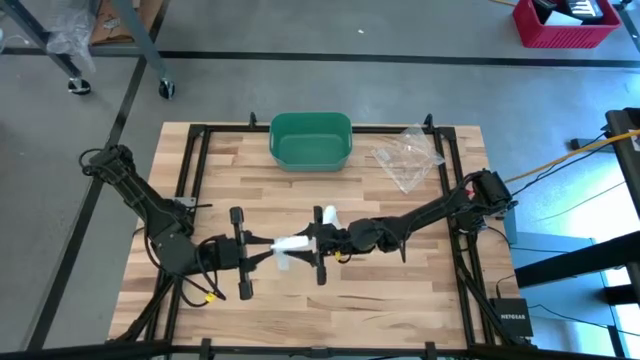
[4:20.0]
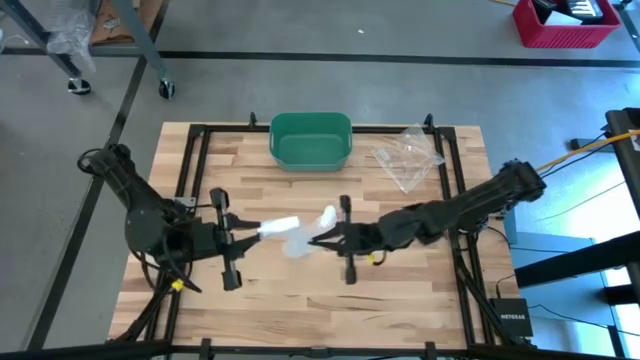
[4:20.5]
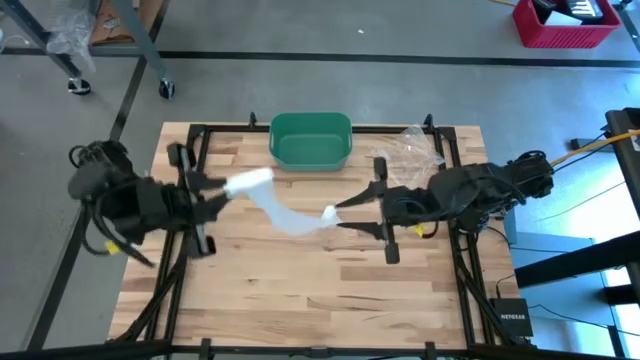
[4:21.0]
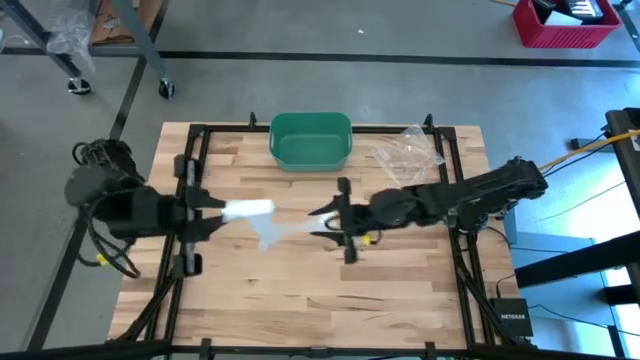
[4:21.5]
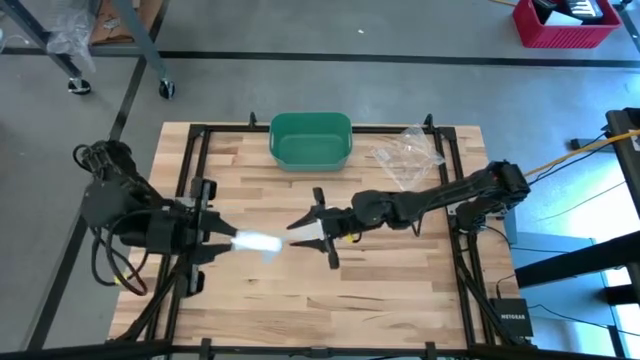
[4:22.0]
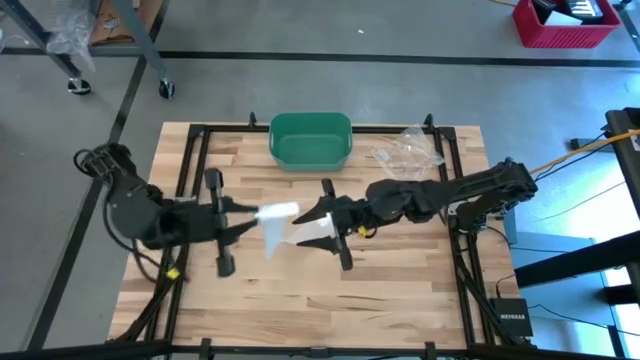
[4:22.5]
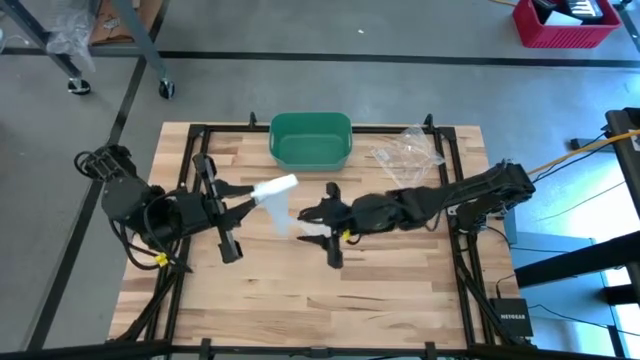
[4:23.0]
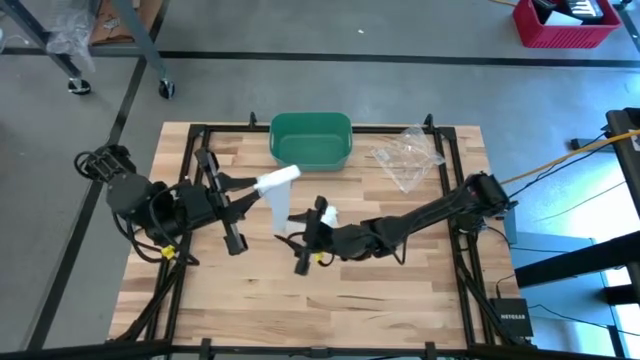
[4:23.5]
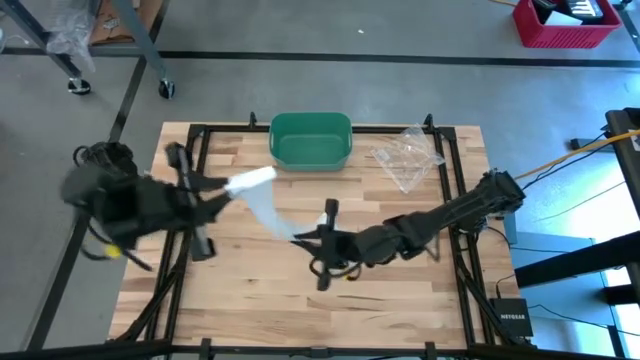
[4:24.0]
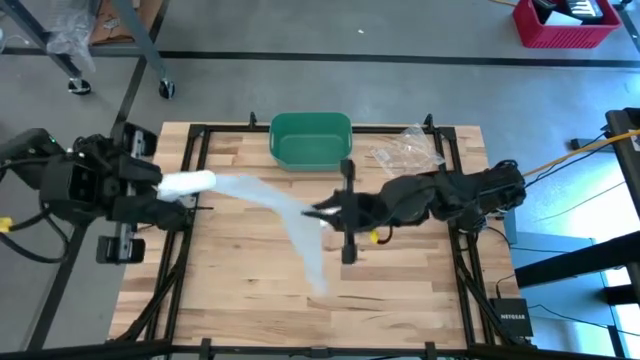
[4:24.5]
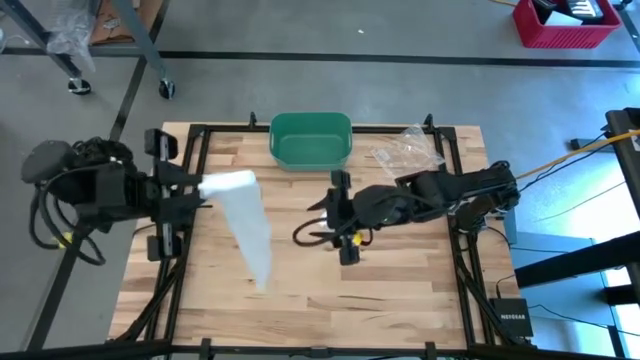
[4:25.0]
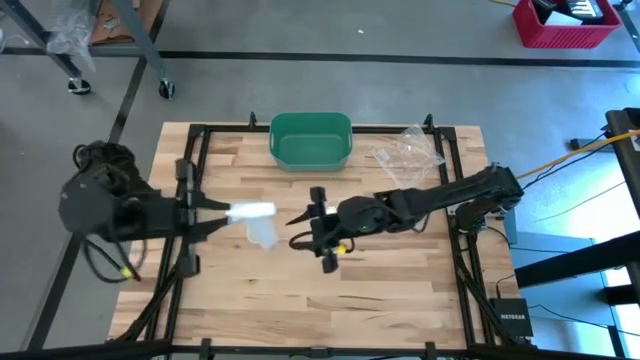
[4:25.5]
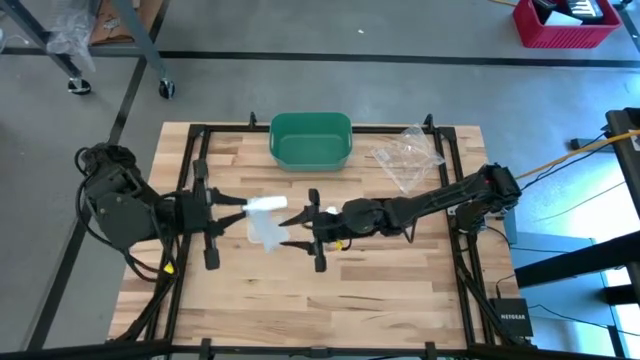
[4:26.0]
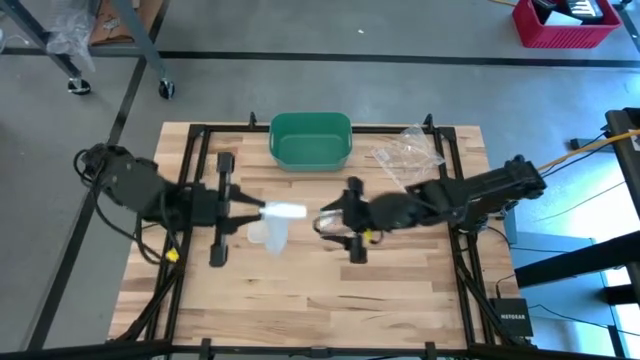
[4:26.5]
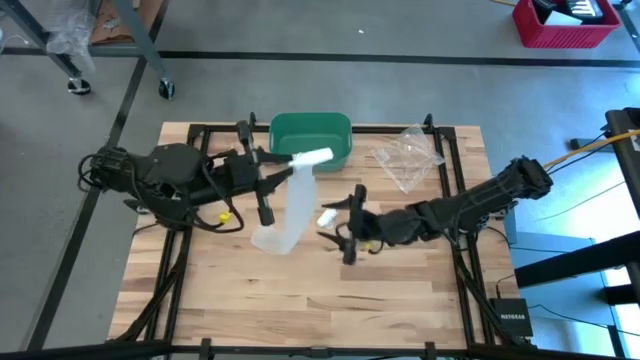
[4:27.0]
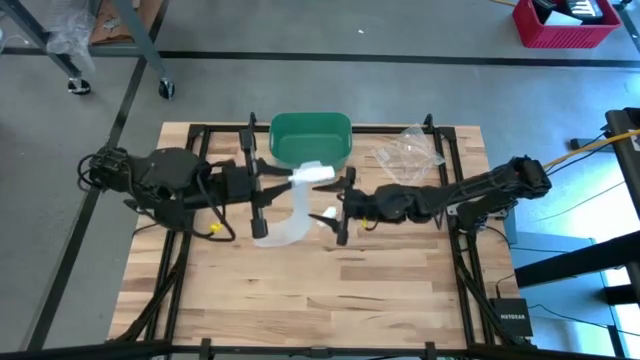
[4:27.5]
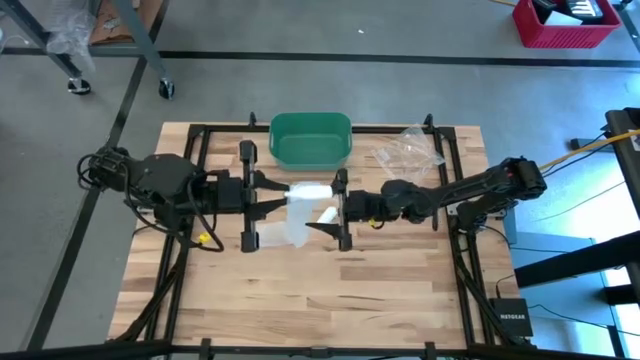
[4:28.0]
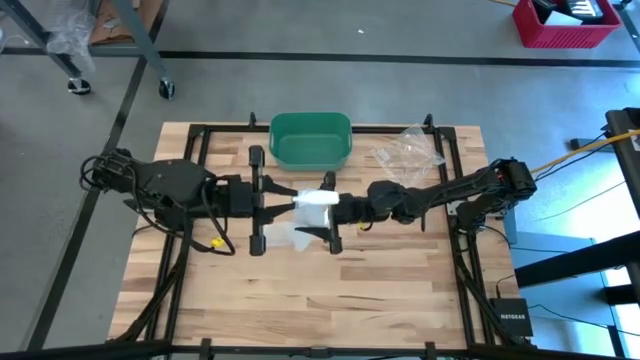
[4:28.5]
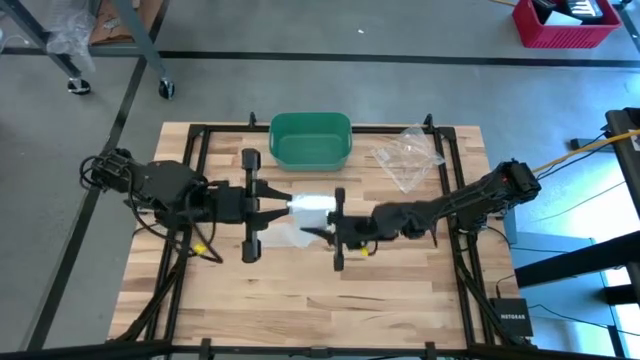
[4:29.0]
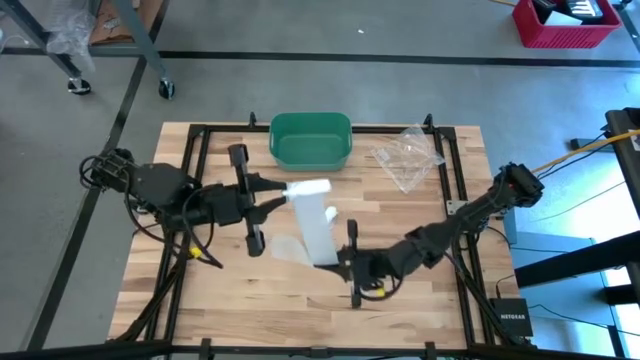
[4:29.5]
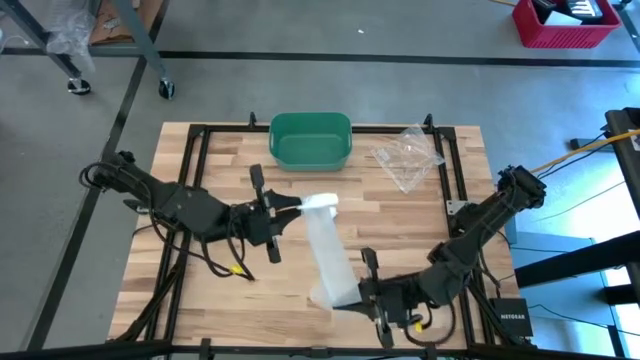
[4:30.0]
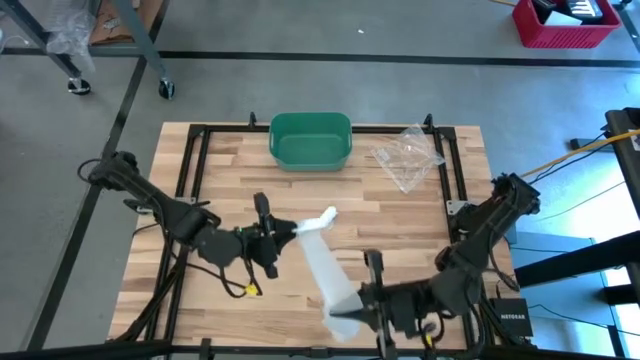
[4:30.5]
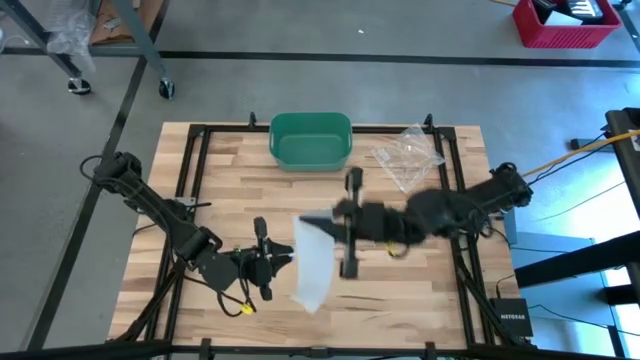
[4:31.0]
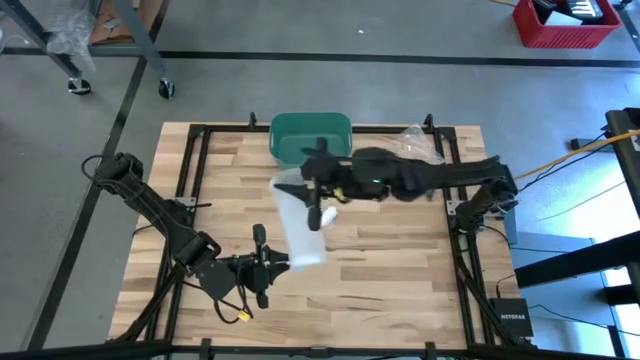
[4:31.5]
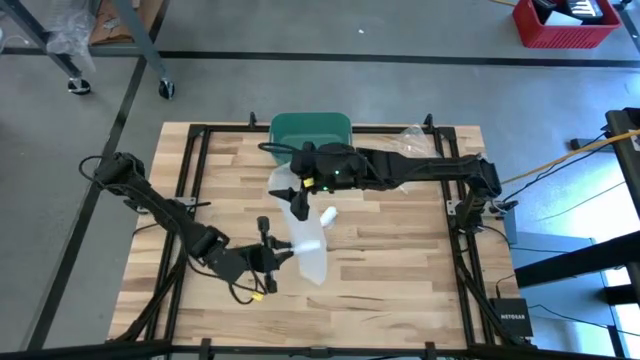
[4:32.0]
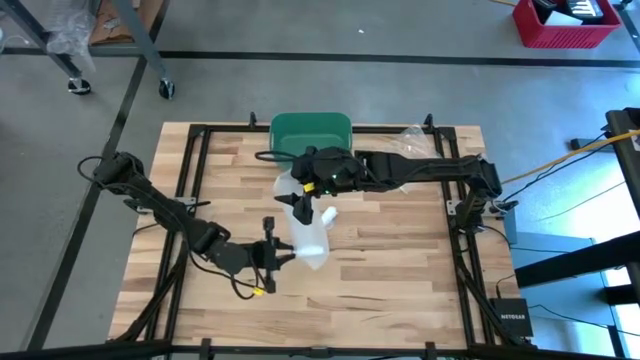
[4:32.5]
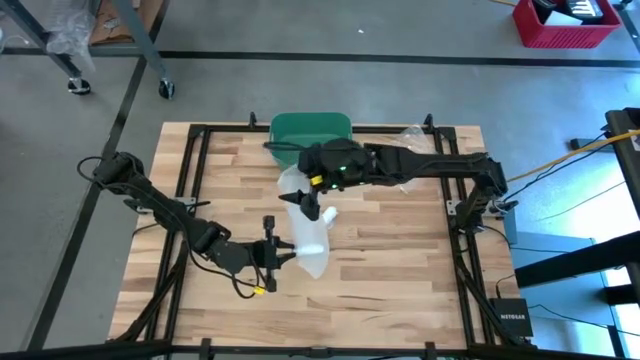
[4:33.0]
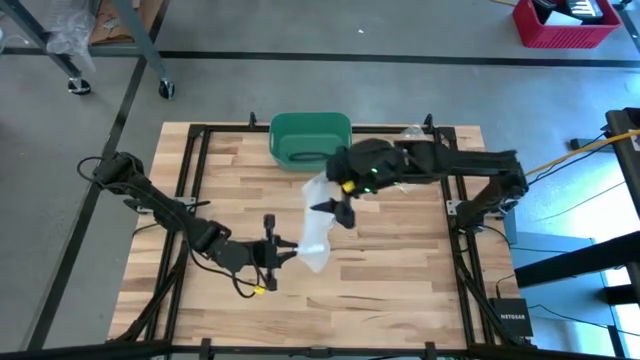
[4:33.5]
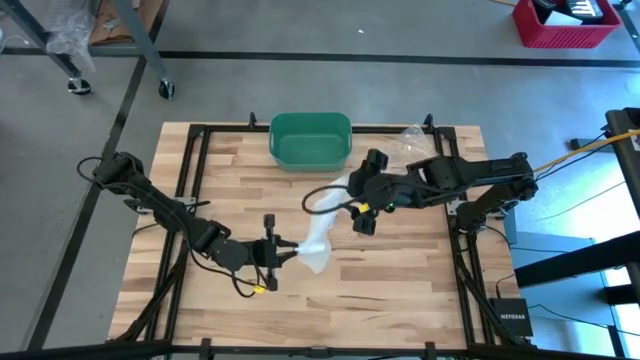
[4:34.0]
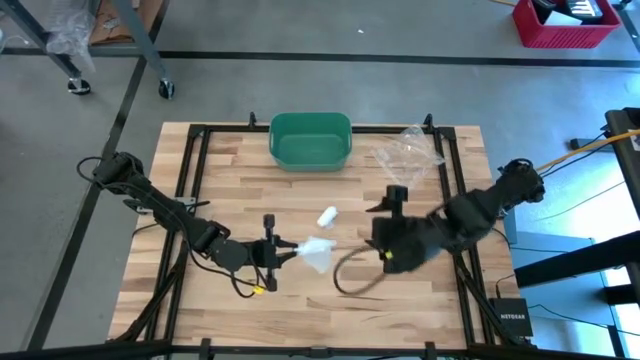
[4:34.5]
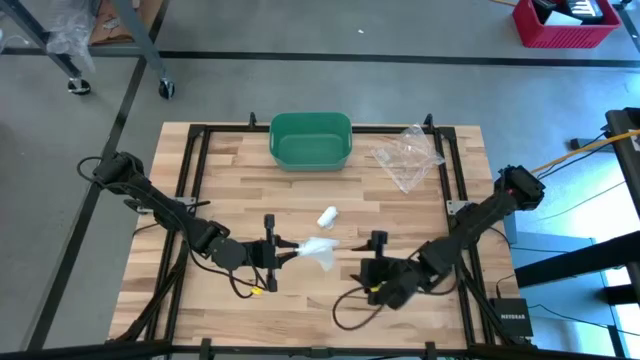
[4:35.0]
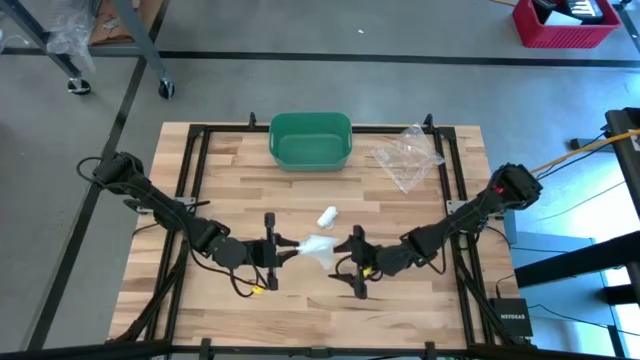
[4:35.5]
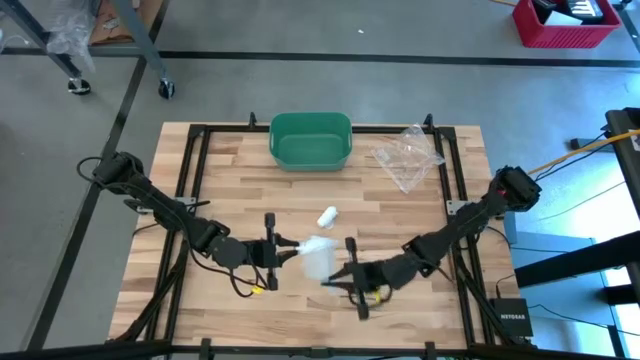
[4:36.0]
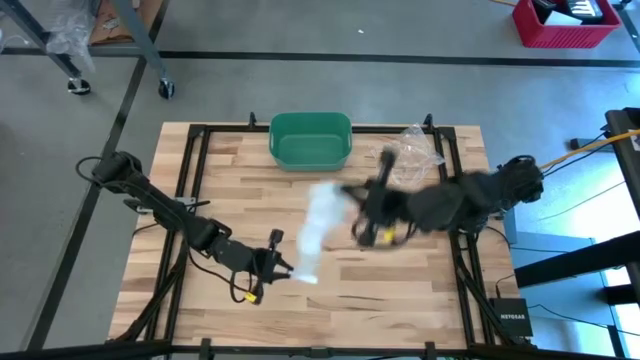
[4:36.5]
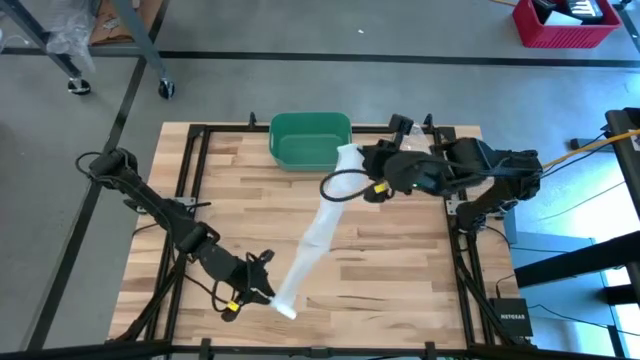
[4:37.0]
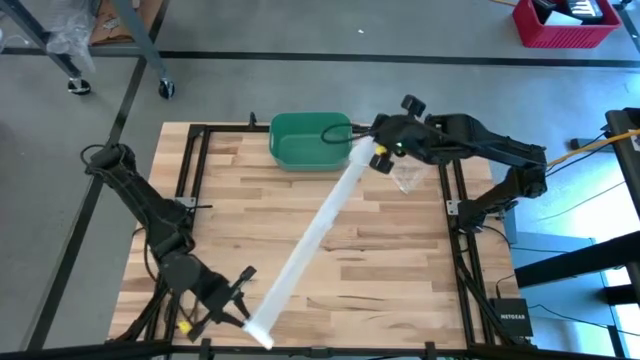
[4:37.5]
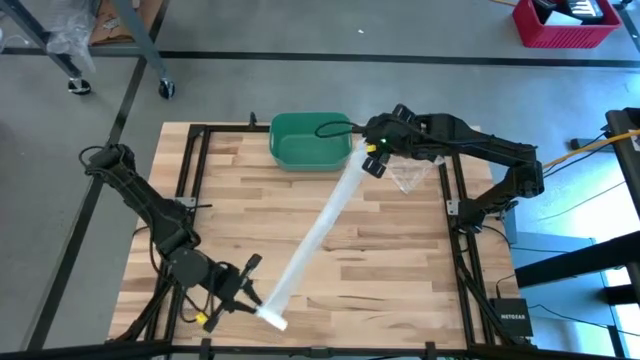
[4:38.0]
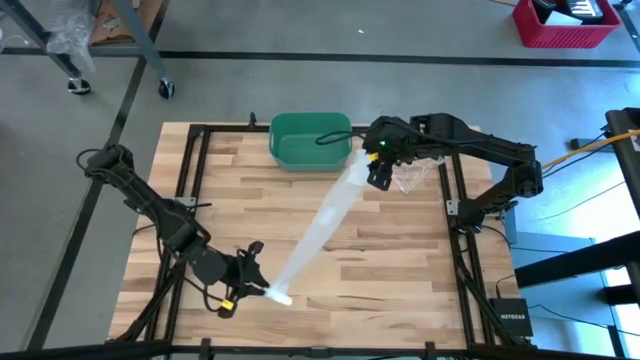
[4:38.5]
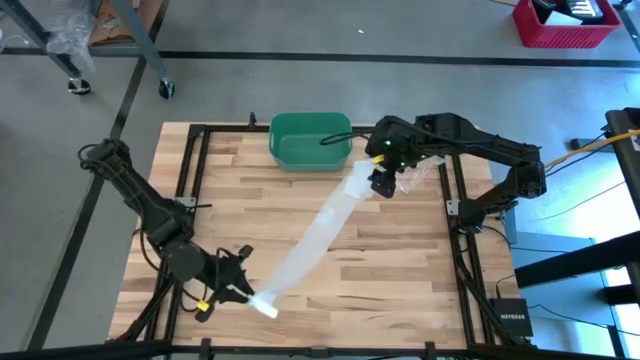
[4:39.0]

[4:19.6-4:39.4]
Task: Roll bandage
Roll the bottom white bandage

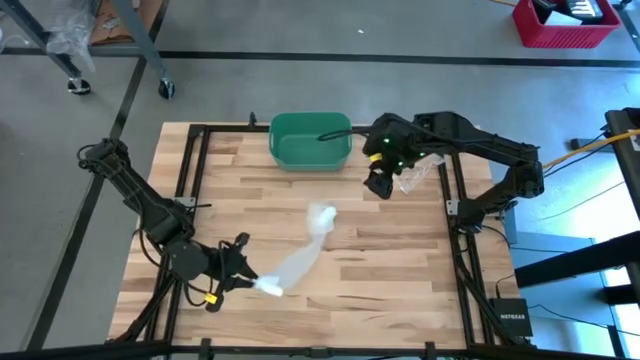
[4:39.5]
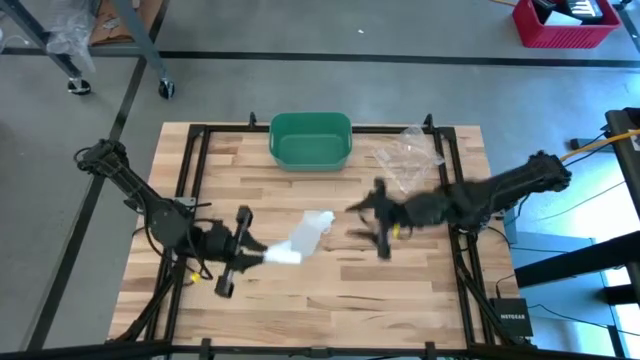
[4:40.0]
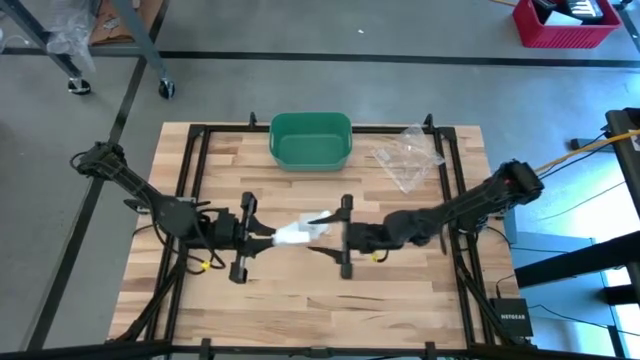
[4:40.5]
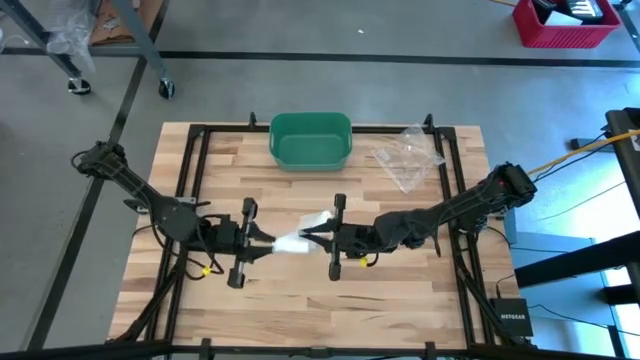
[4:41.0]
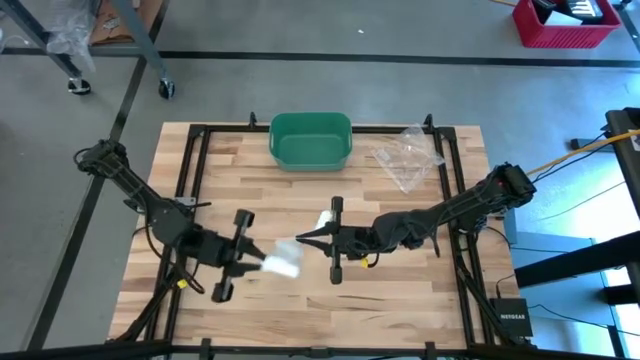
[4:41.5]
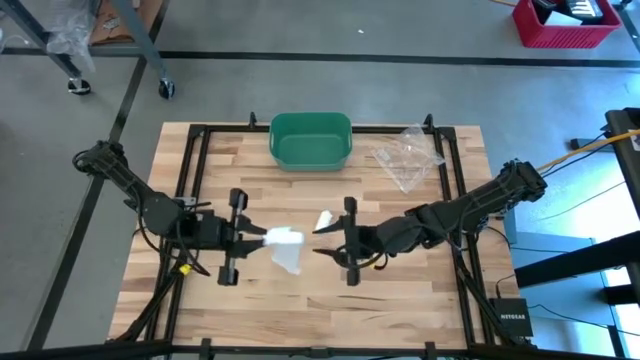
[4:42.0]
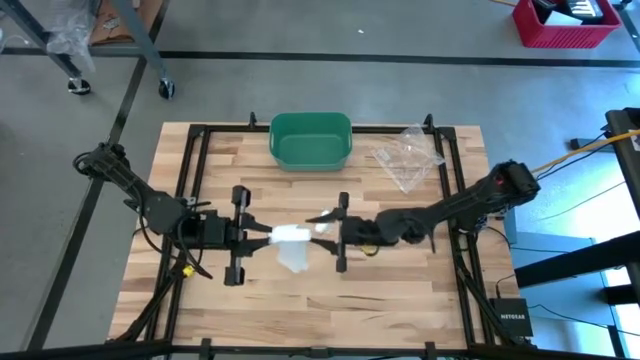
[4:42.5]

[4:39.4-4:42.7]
Roll the bottom white bandage
